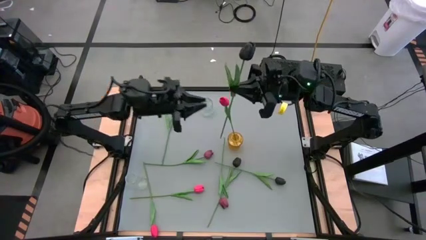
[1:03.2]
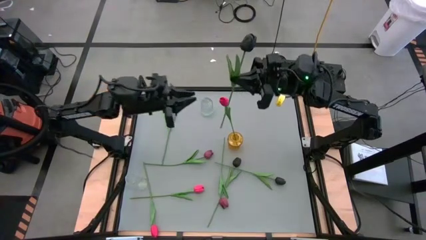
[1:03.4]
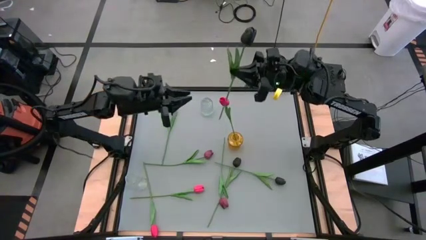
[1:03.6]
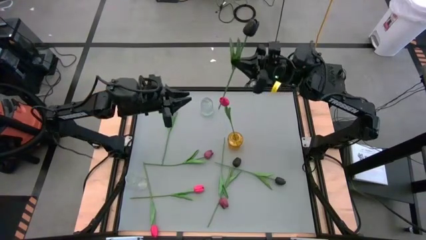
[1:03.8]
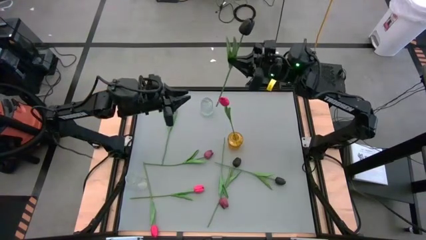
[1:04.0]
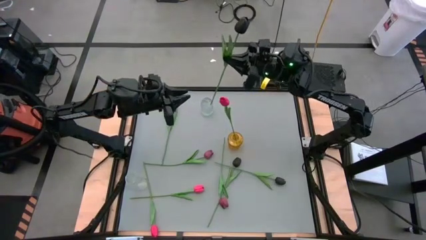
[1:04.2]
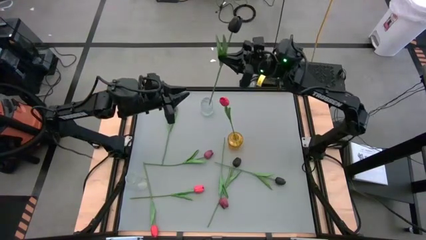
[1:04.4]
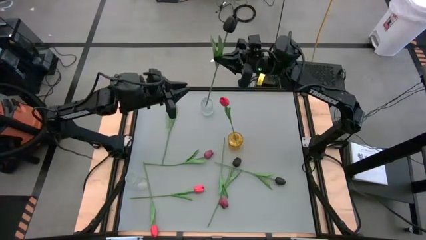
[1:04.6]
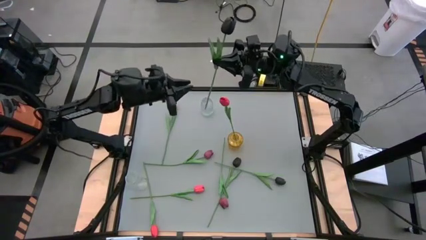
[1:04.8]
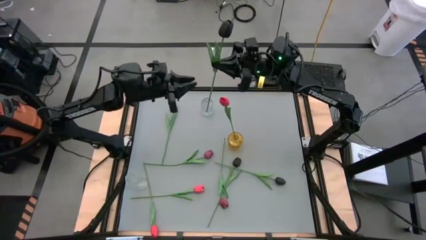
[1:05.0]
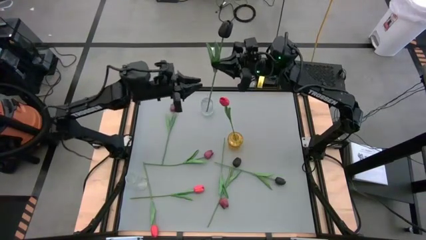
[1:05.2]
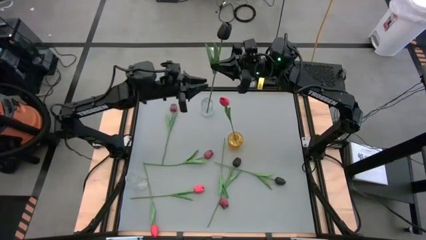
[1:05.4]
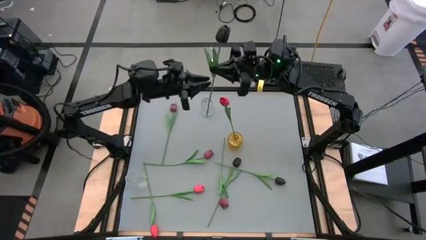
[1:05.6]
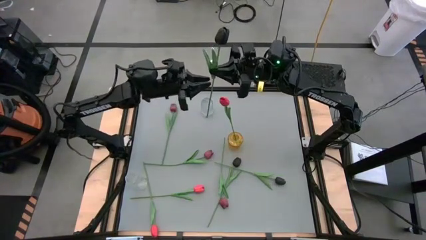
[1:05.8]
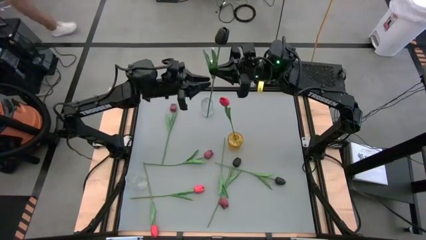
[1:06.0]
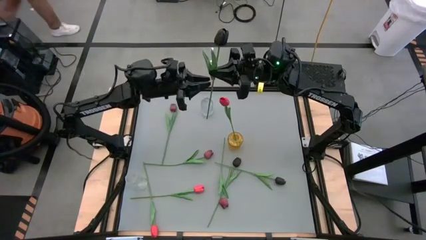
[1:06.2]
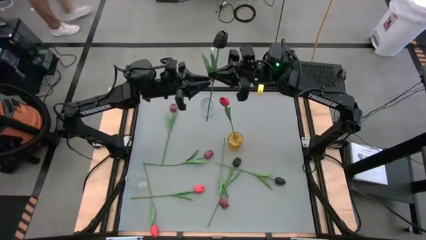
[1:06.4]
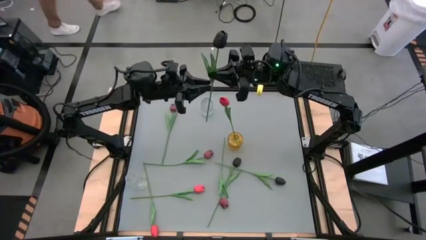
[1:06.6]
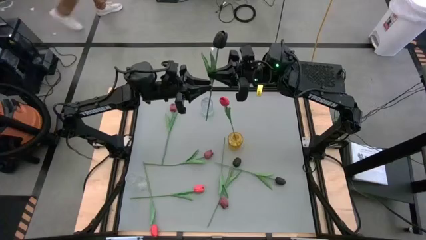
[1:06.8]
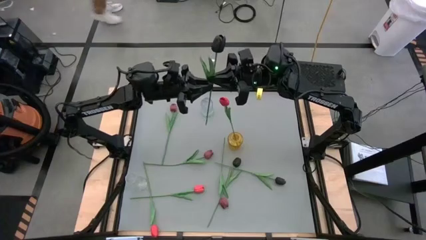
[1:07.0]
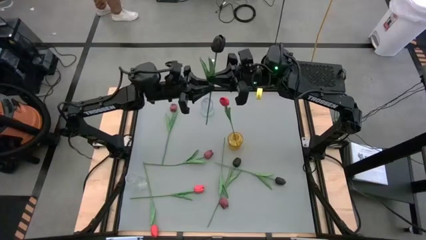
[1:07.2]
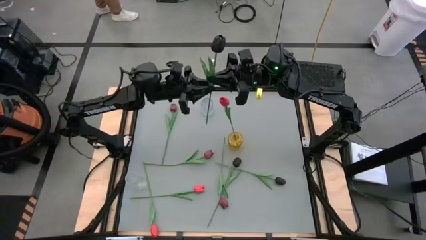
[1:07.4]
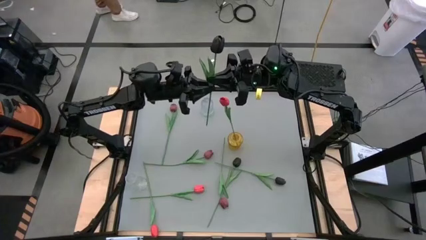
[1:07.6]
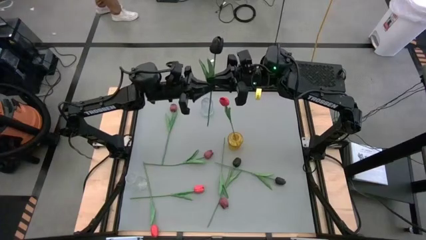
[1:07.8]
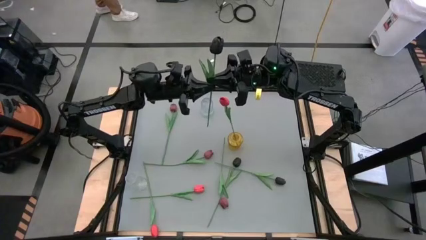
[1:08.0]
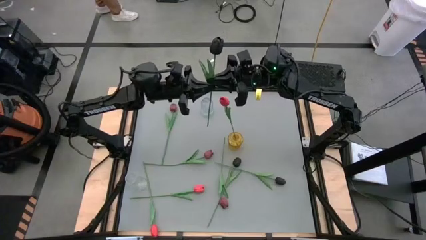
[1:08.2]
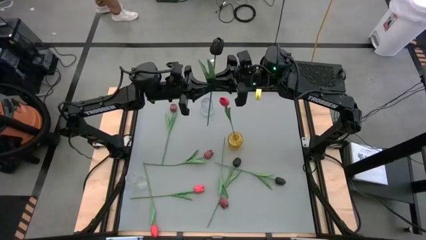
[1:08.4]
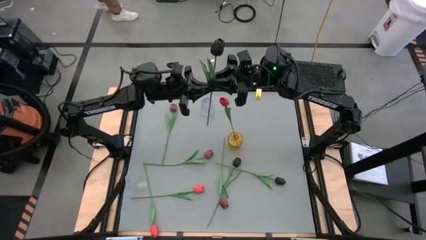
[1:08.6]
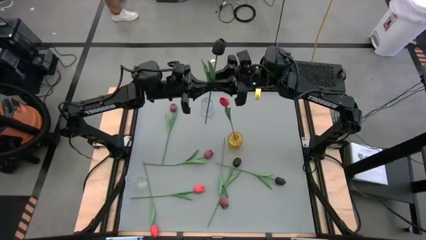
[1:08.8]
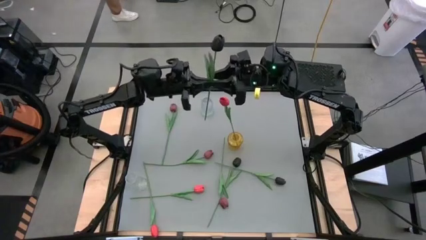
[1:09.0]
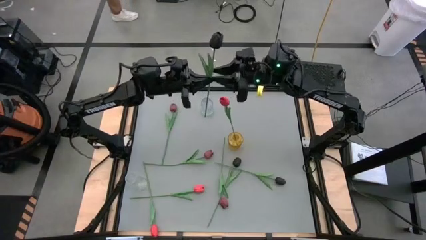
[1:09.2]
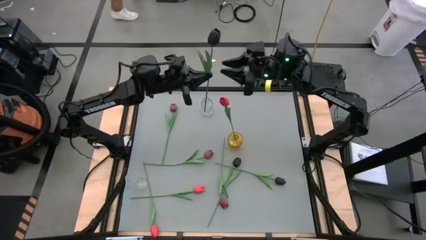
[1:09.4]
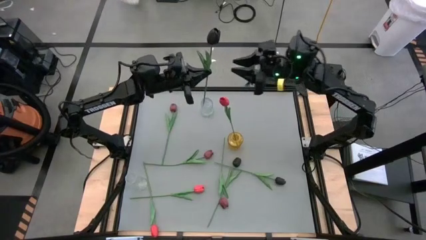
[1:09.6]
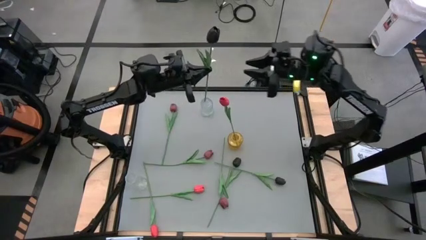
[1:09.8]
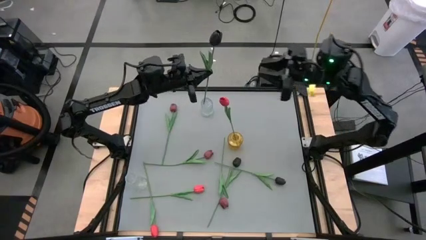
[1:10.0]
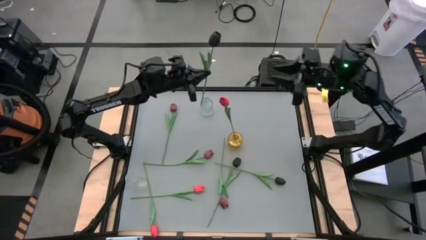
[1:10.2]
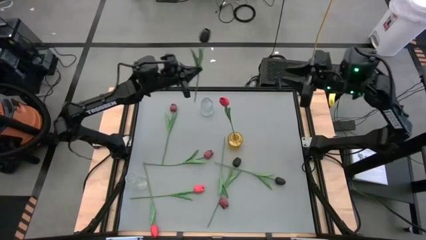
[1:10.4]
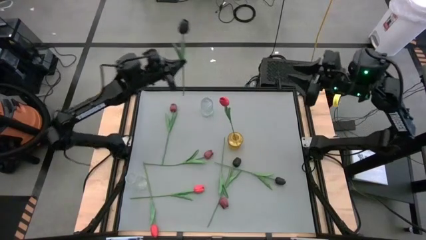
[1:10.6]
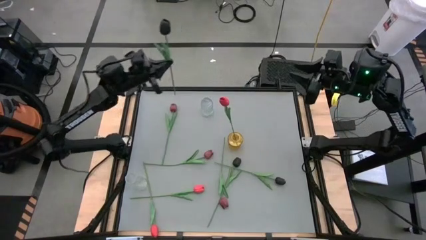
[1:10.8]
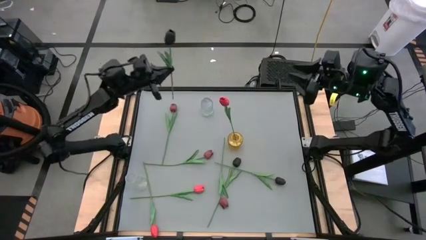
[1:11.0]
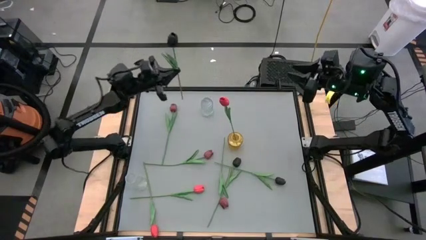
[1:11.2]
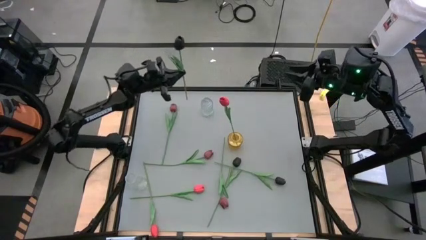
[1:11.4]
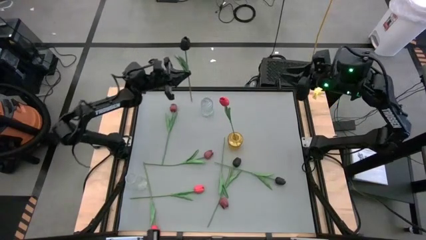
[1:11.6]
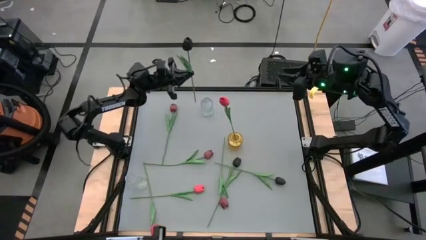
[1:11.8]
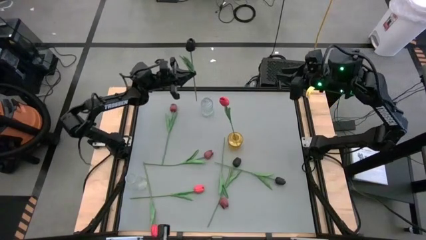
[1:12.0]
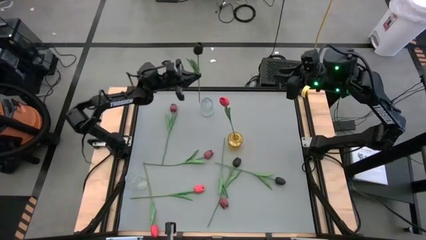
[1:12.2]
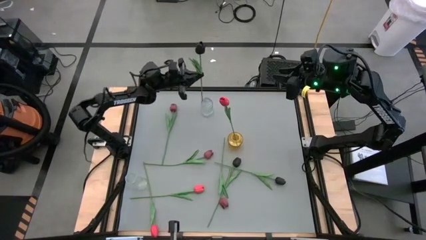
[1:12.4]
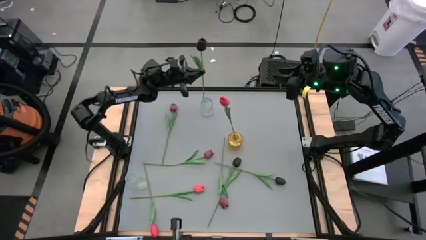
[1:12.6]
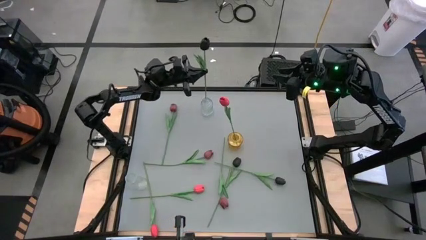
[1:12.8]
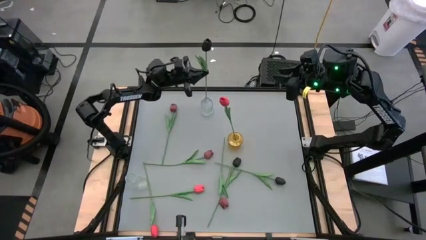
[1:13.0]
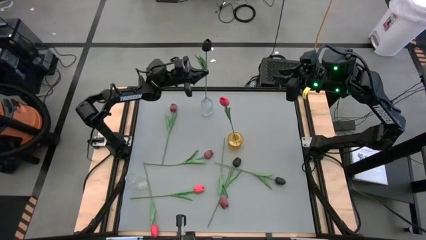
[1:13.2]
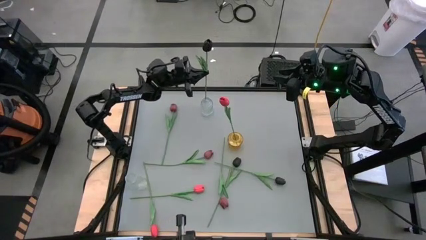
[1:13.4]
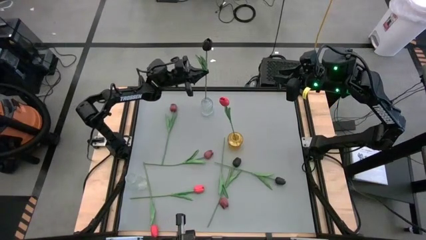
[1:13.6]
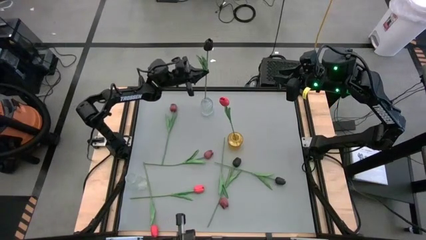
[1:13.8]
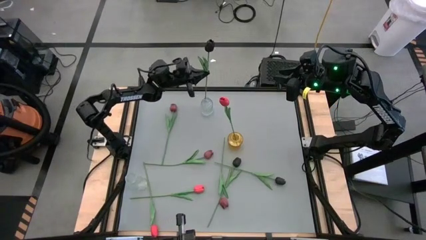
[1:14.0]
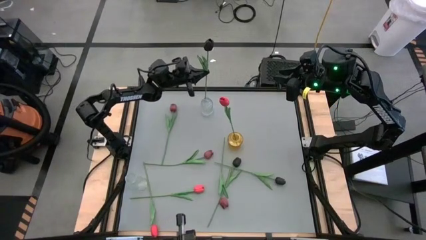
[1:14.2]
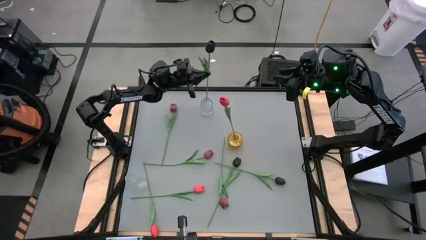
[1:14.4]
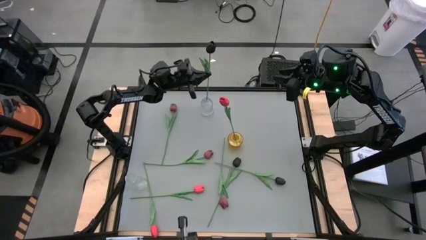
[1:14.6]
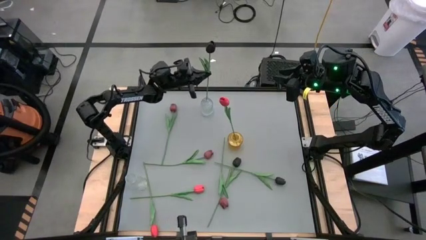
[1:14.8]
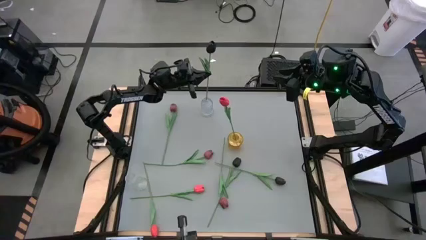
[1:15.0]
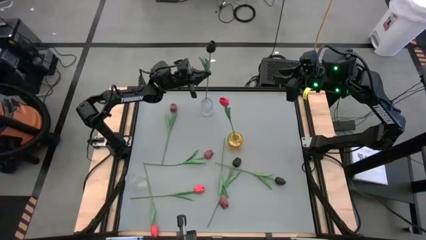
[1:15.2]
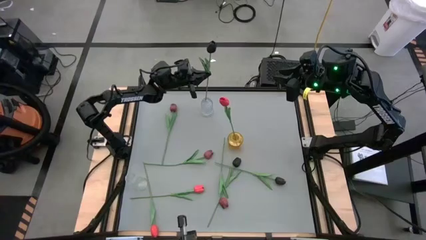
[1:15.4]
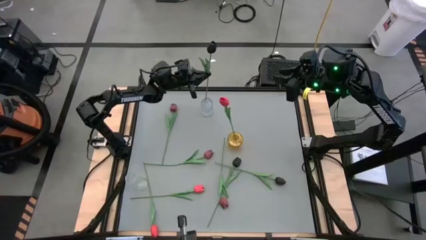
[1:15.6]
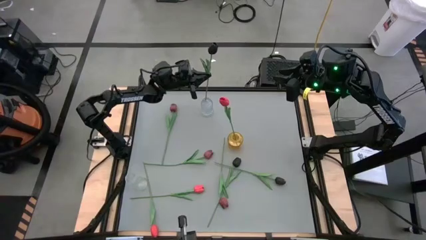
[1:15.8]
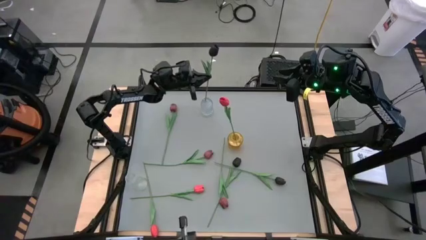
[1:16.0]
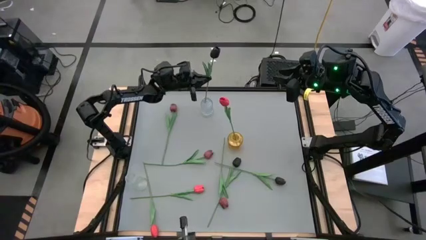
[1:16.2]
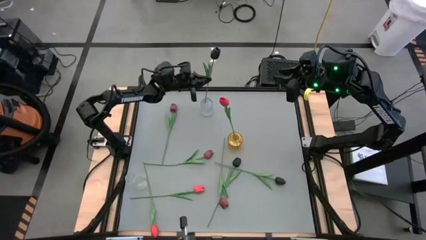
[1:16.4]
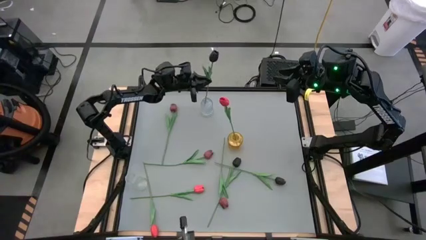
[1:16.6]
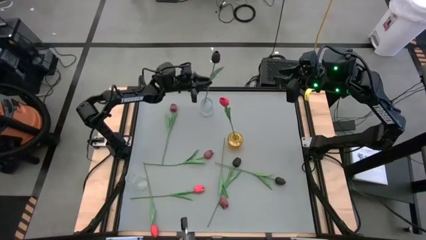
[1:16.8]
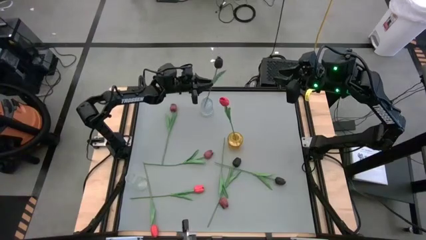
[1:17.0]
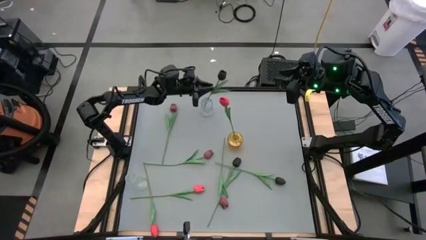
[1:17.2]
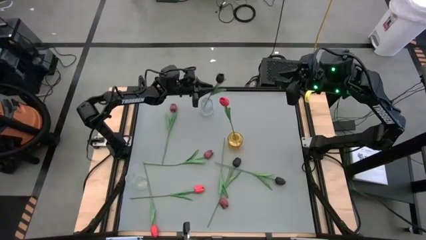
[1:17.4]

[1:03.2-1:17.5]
Task: Sort flowers into vase by color
Put the top black tulip into the top transparent vase

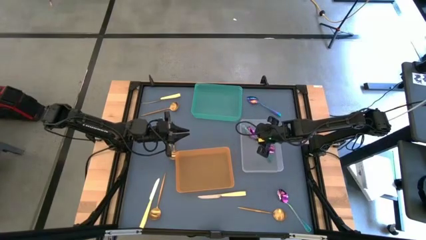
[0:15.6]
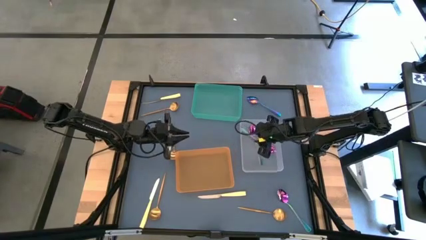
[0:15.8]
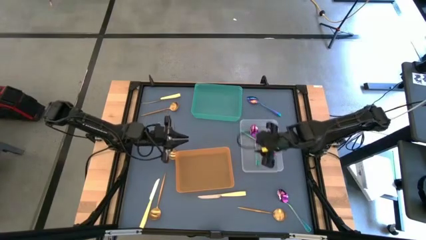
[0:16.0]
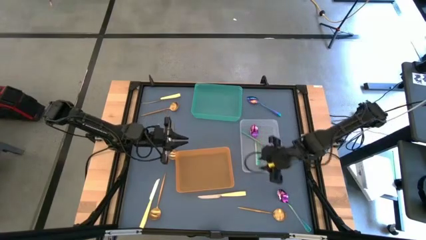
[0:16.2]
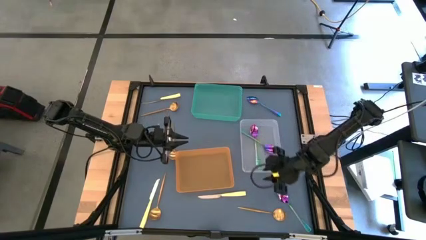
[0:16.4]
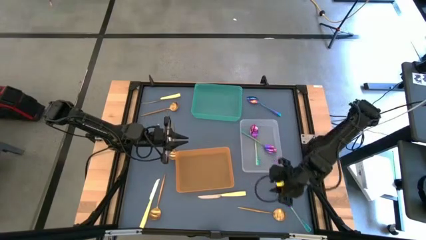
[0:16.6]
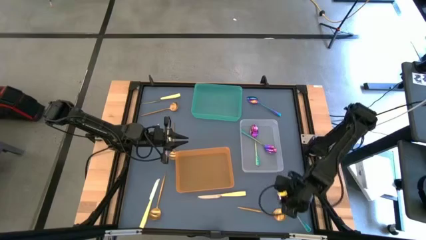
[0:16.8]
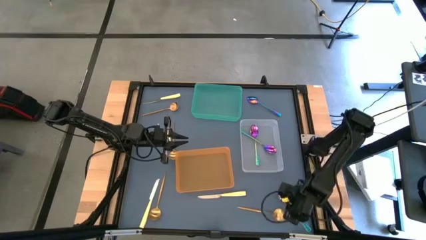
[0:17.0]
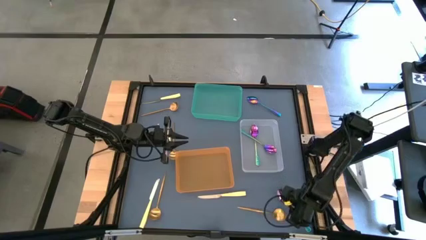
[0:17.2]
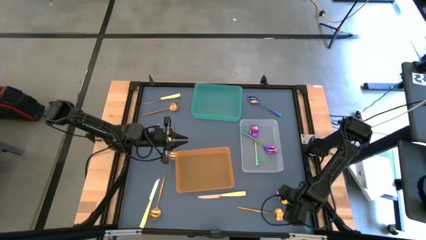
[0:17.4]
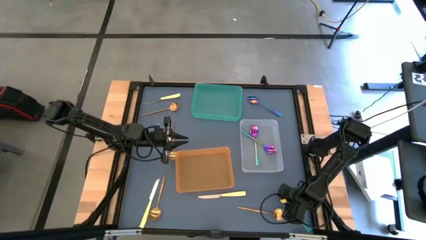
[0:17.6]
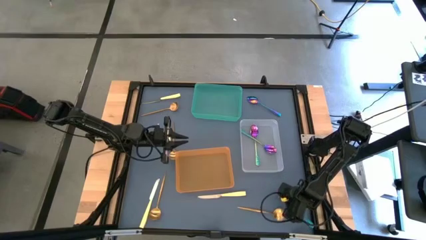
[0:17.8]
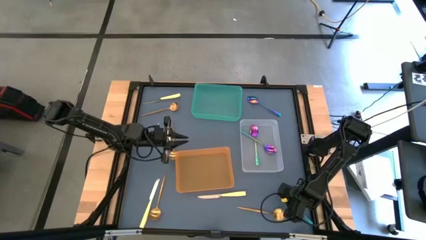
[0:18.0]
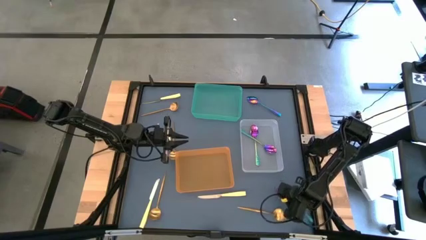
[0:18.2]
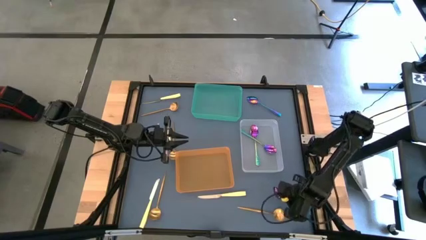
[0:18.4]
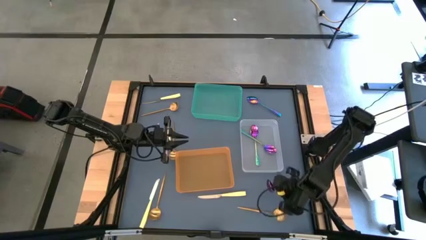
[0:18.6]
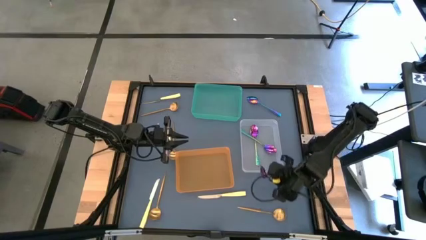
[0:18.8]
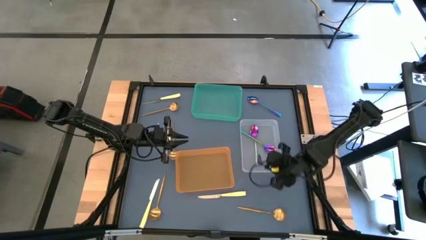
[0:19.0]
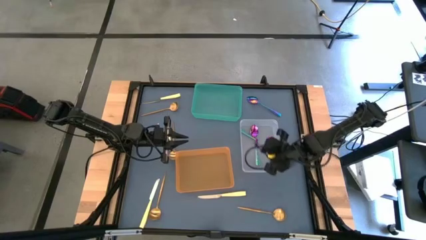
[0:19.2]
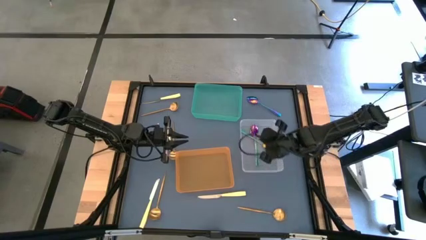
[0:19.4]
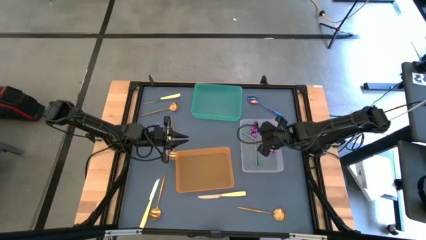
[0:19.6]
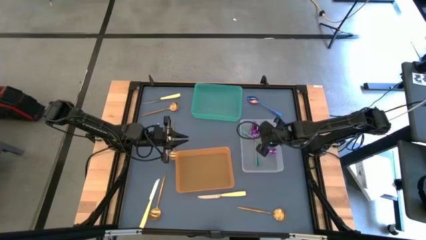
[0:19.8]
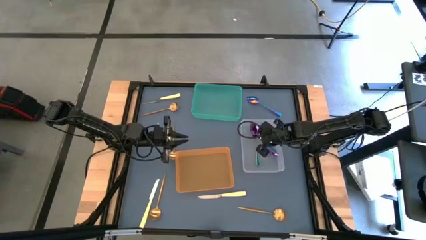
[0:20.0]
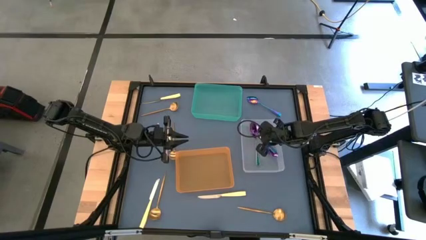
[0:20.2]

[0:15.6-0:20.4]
Task: Sort silverware by color (type)
Put the blue spoon into the transparent bin
